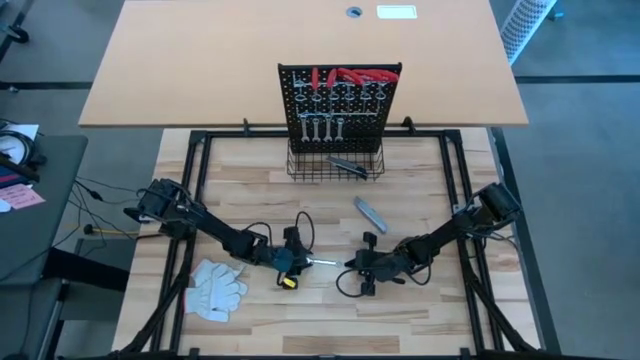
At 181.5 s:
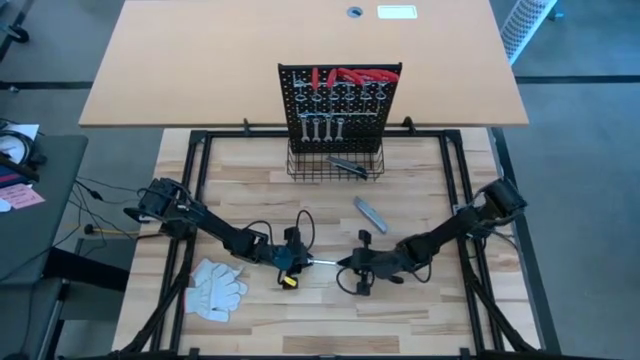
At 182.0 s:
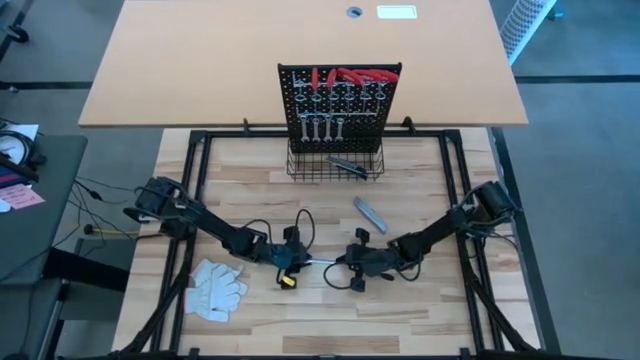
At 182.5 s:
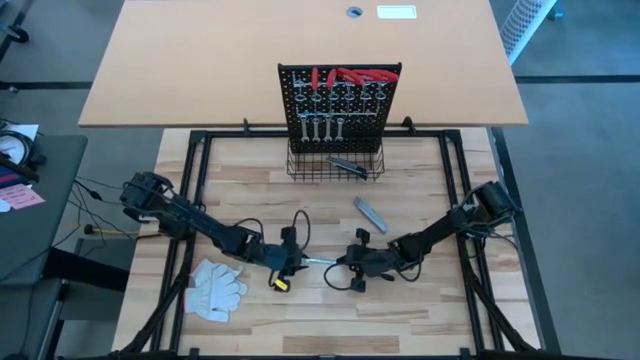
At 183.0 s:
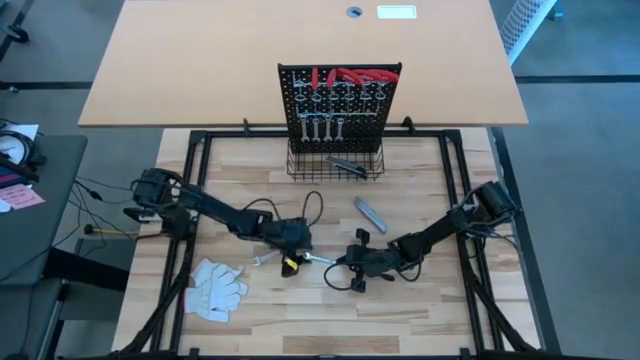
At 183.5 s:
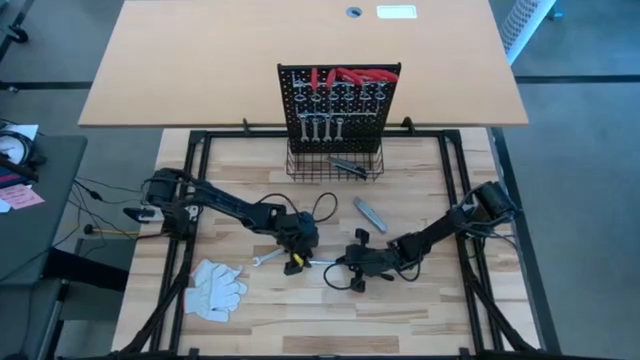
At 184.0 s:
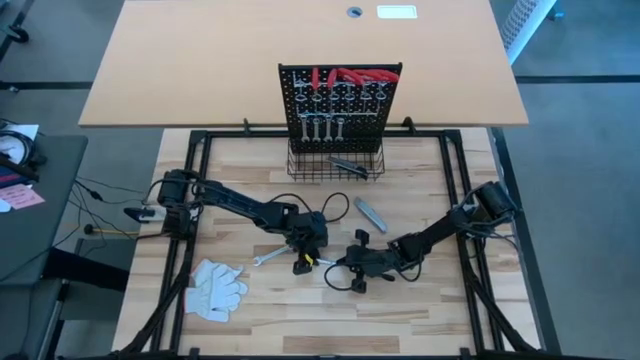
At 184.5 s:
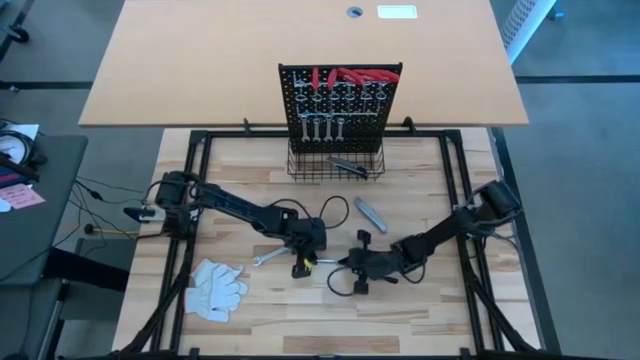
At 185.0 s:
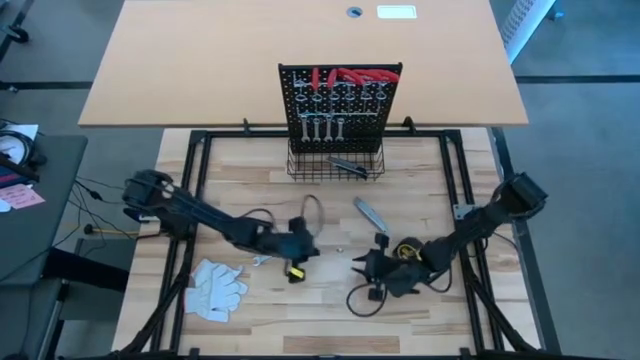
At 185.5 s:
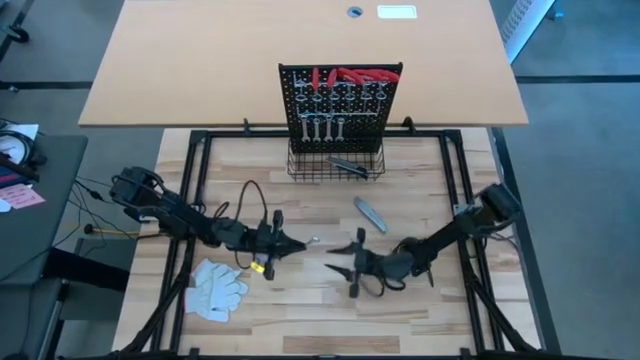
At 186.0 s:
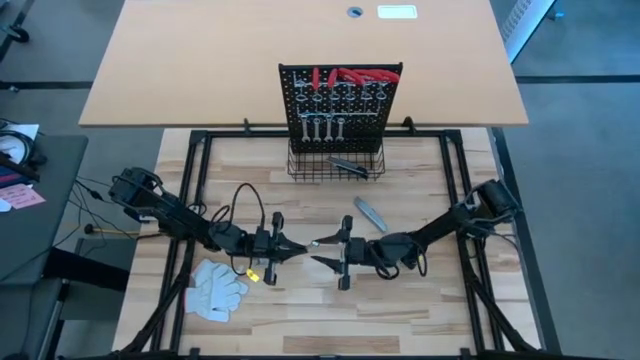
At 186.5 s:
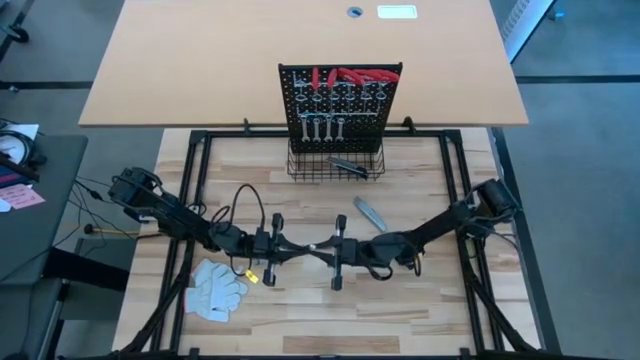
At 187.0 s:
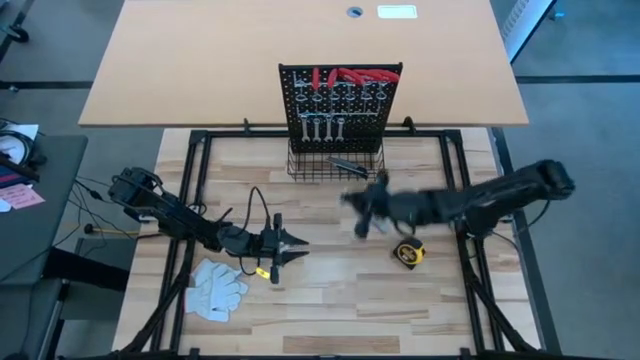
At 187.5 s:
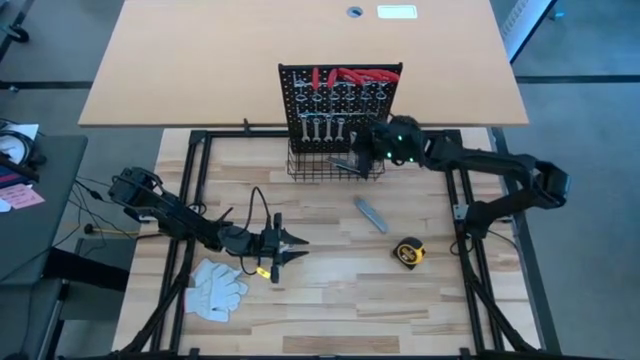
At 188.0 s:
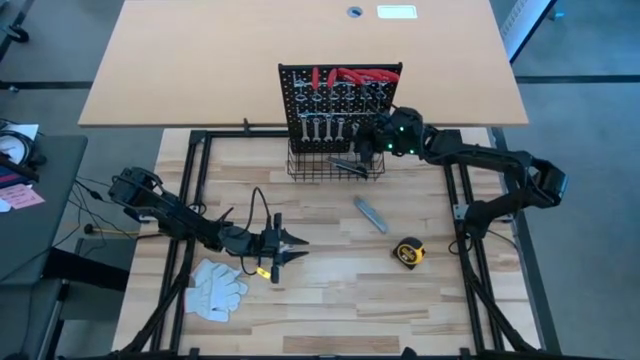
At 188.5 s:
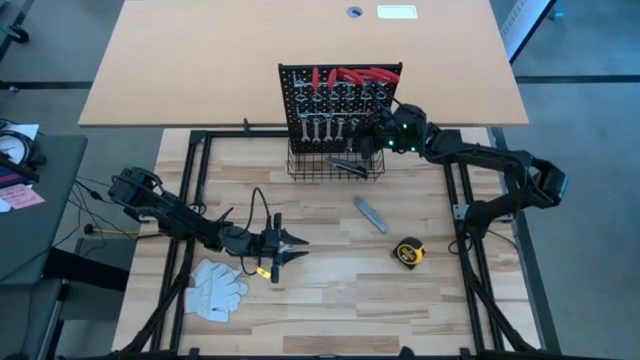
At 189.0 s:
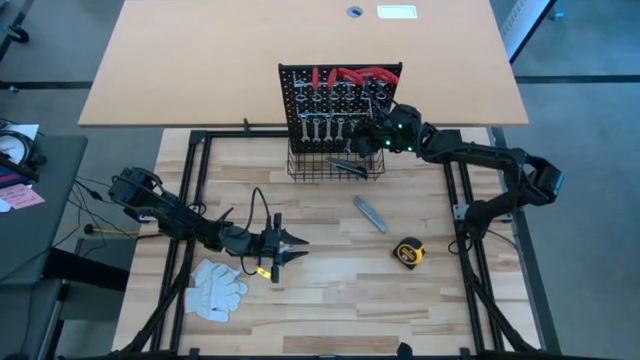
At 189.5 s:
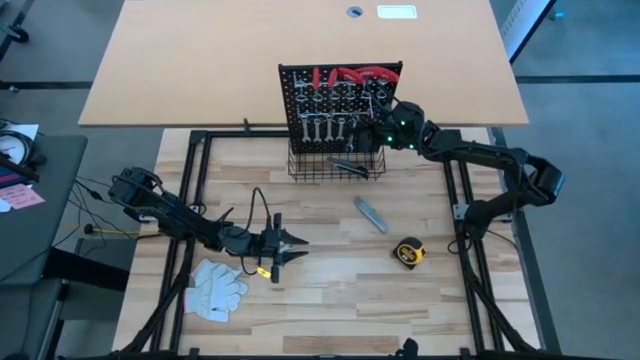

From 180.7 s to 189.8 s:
Task: Hang tools onto peg board
Hang the silver wrench on the pegboard

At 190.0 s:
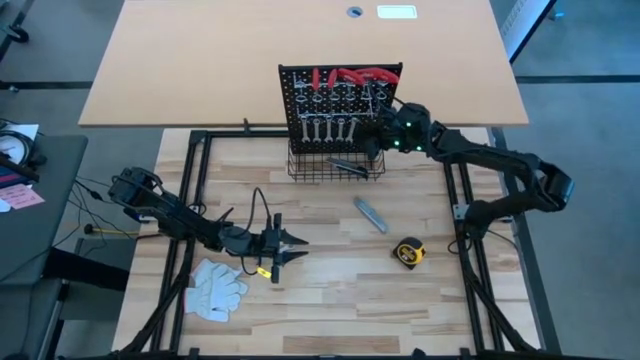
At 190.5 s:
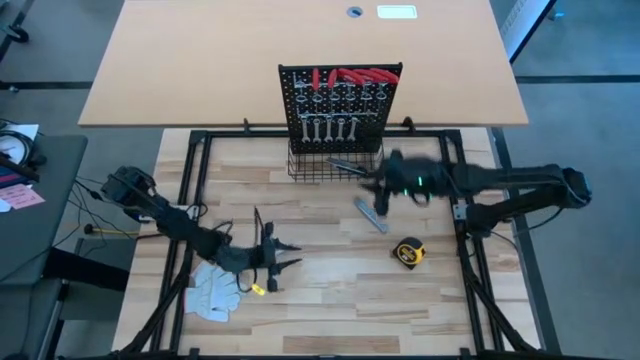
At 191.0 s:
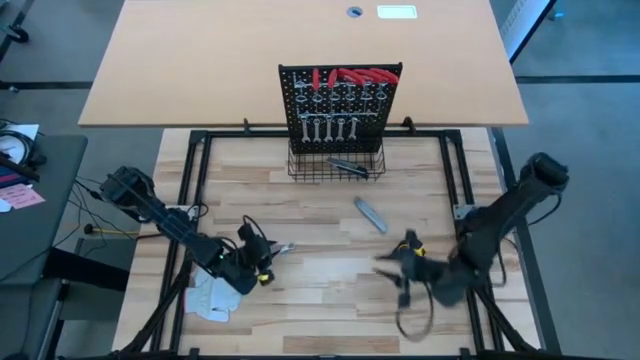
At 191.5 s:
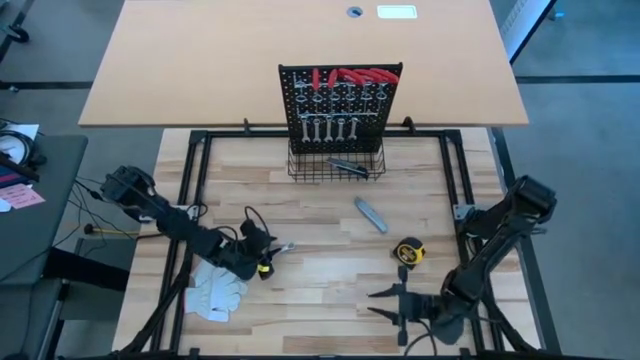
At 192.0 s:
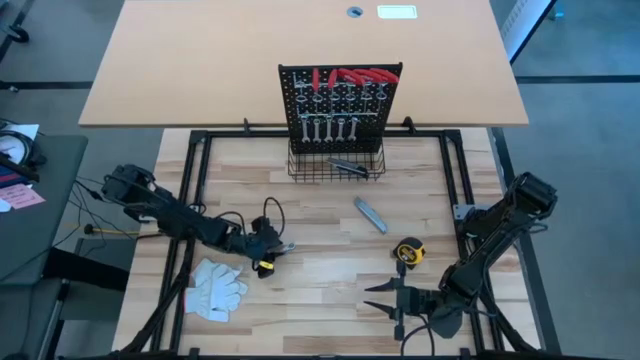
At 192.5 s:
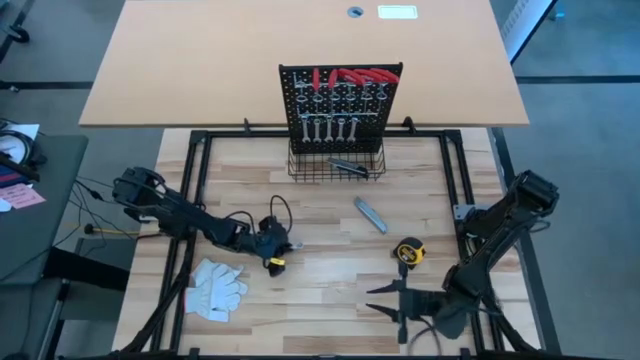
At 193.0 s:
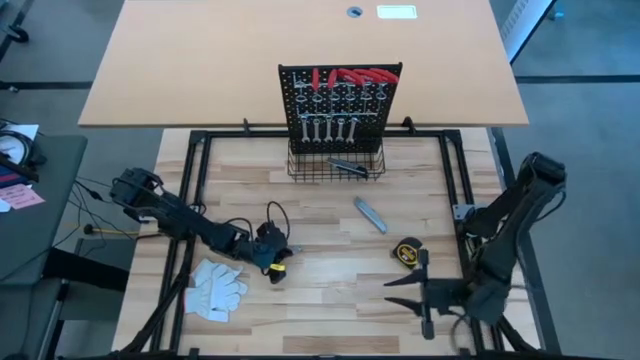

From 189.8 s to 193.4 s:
Hang the silver wrench on the pegboard

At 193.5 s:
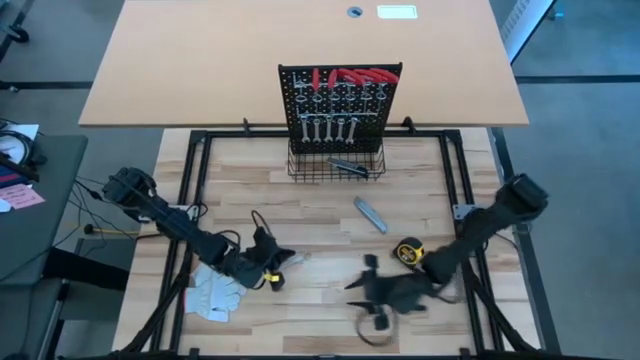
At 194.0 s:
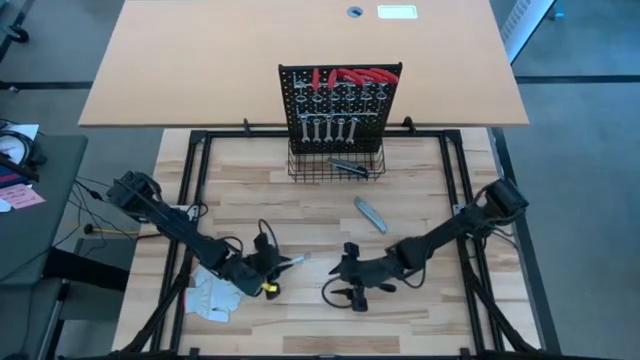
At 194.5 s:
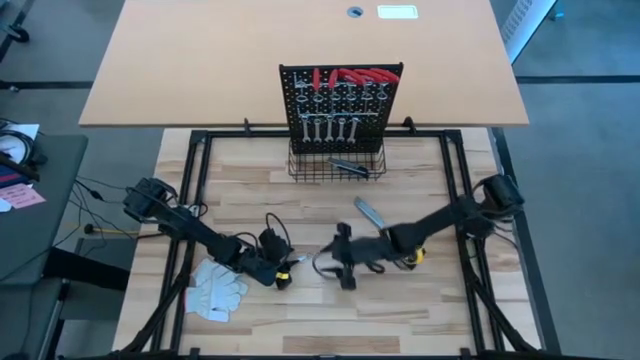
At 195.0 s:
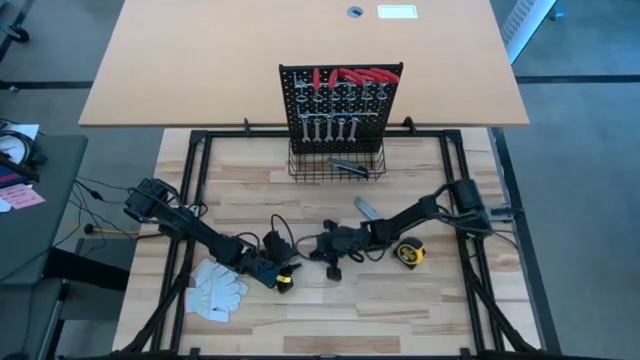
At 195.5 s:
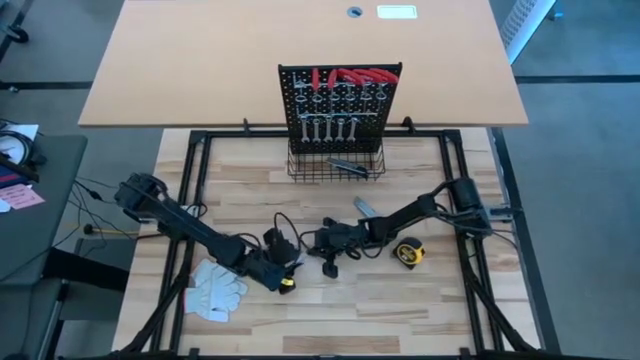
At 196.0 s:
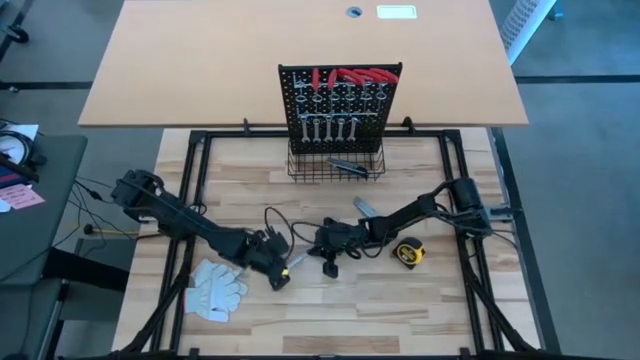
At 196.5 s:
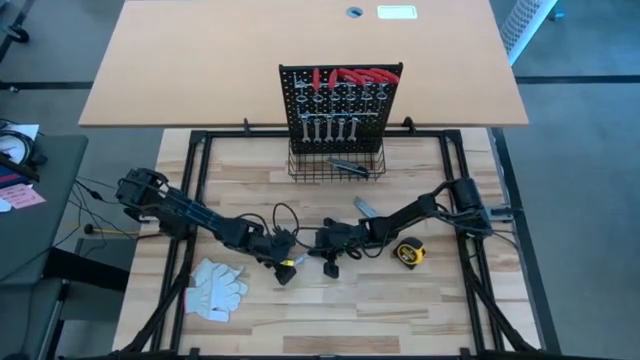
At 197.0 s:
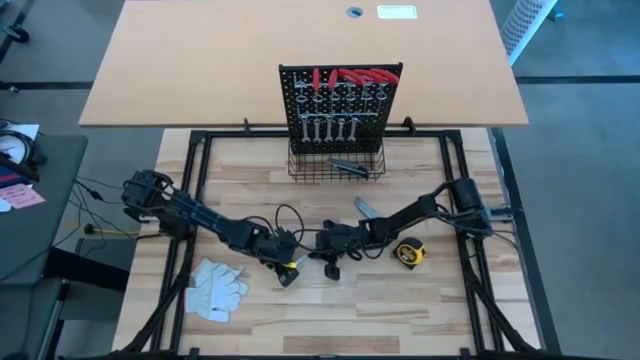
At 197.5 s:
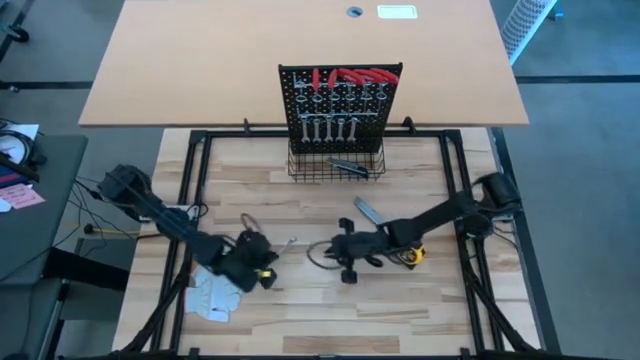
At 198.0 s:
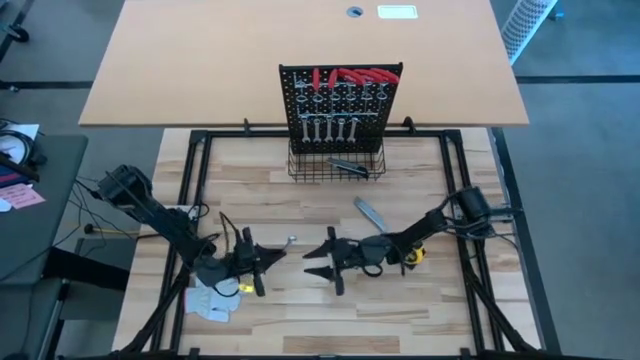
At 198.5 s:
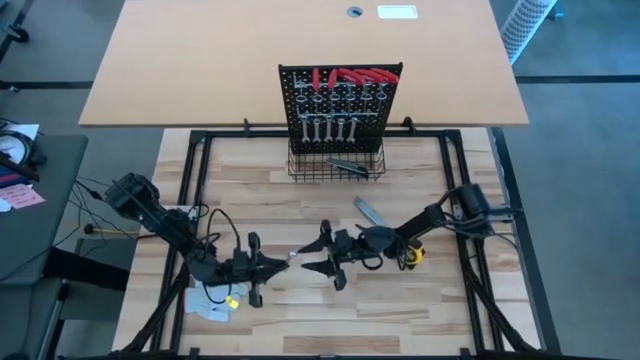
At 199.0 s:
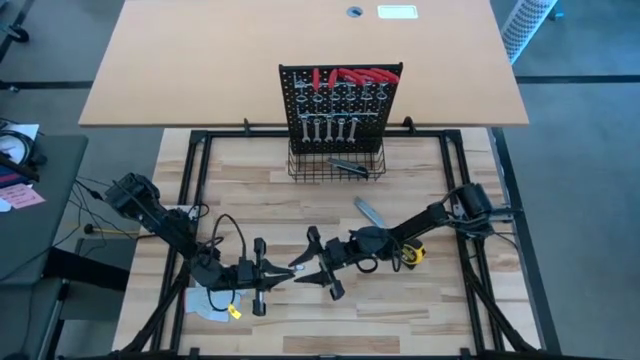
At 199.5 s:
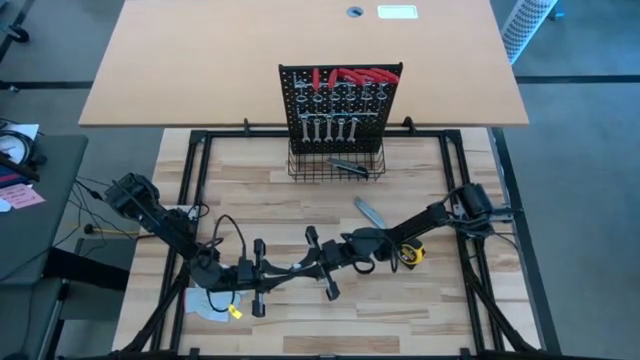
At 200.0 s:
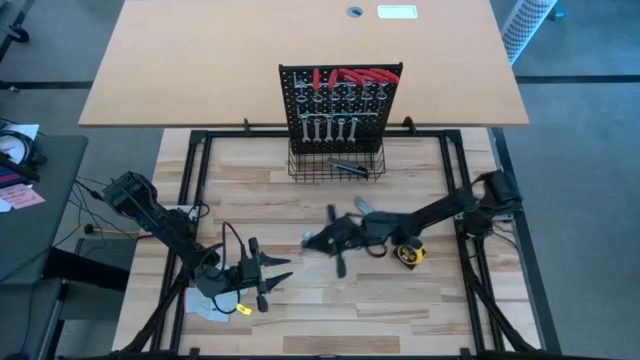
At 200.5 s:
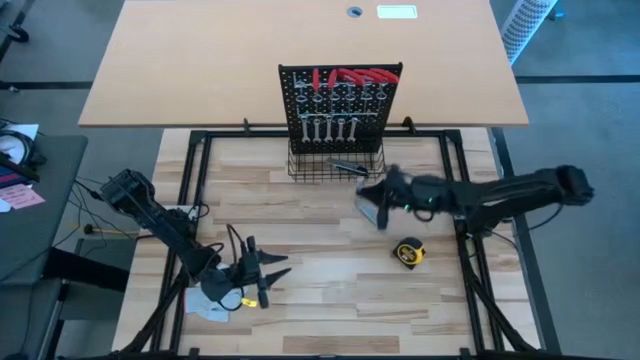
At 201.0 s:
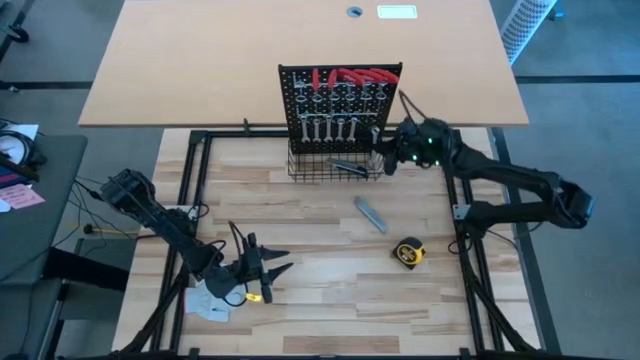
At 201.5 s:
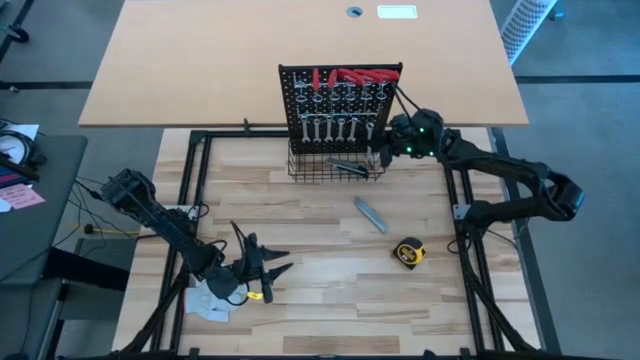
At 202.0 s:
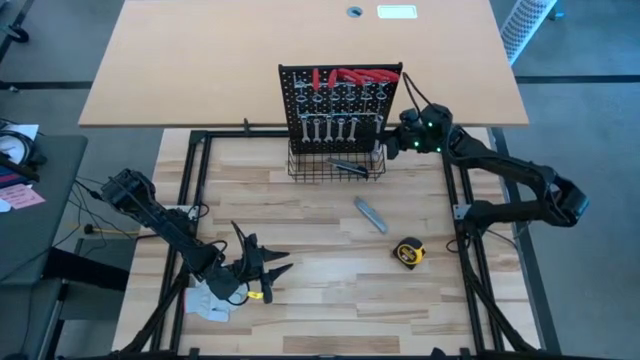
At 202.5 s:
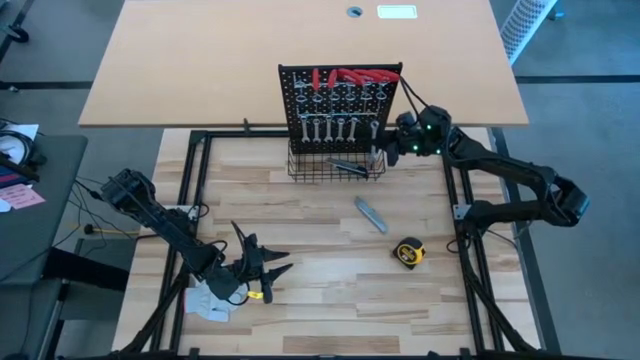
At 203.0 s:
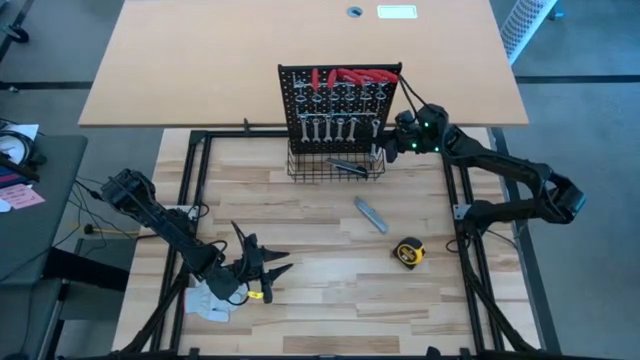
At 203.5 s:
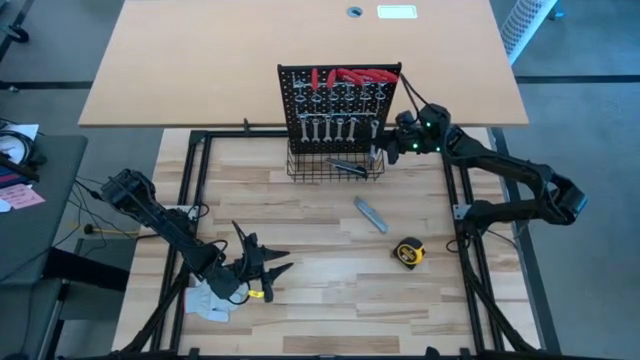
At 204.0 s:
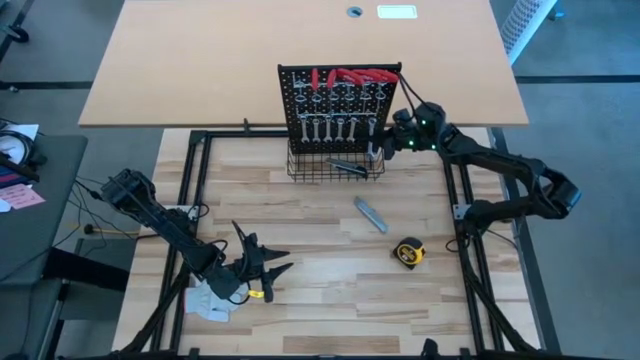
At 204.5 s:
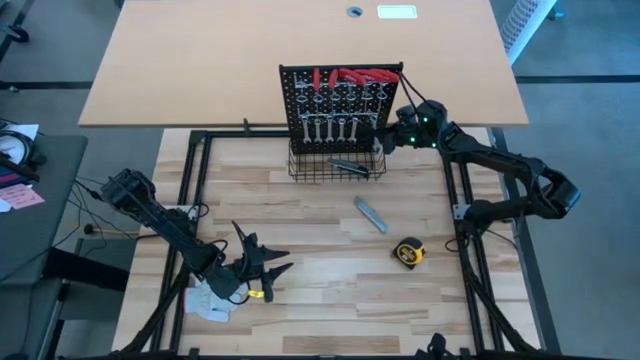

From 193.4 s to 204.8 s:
Hang the silver wrench on the pegboard
